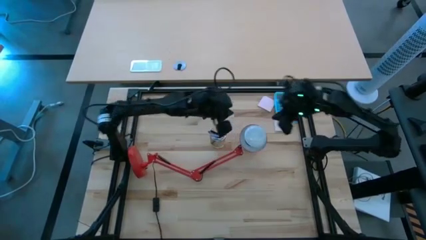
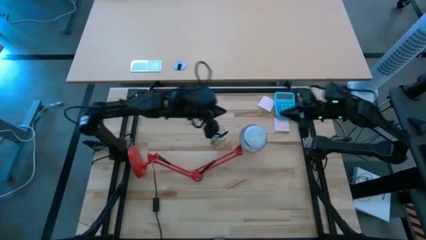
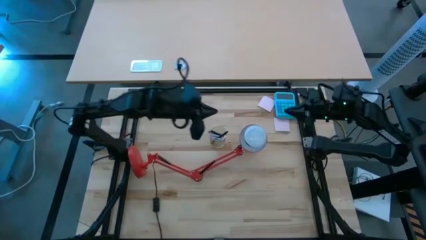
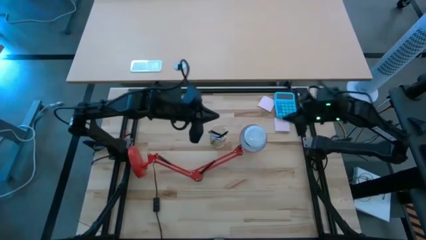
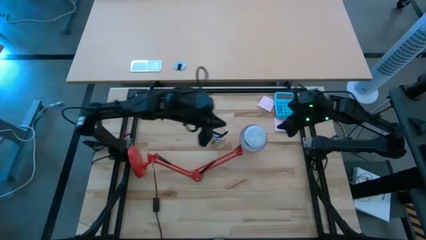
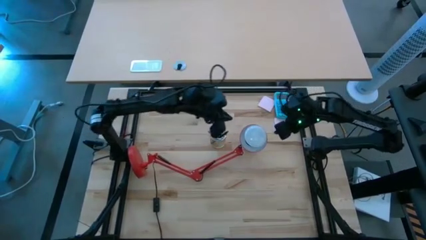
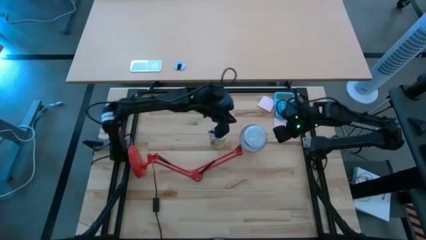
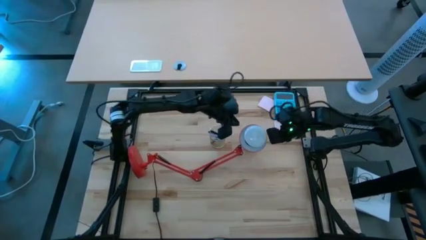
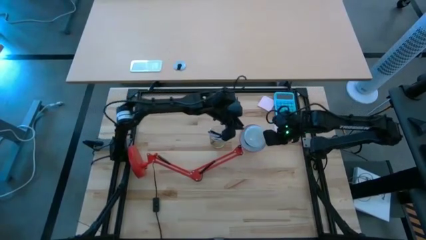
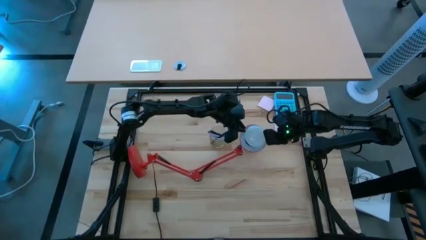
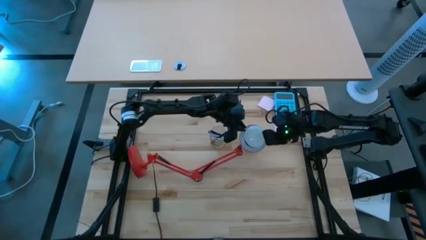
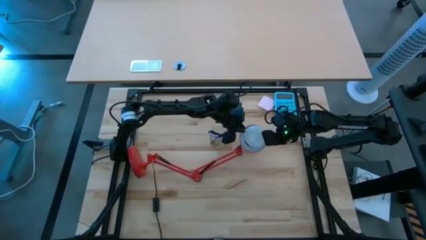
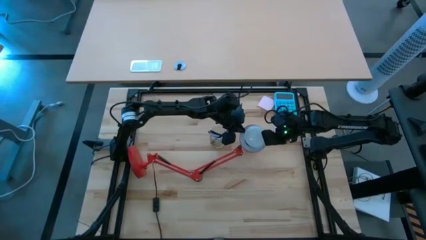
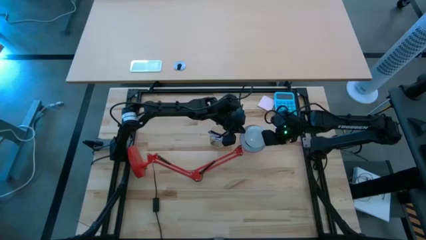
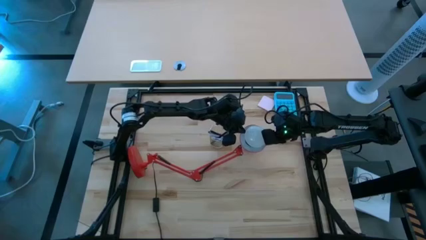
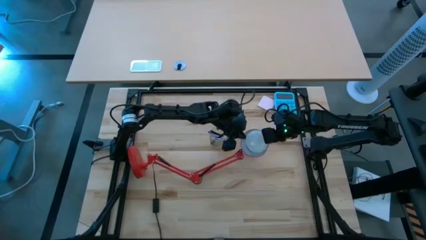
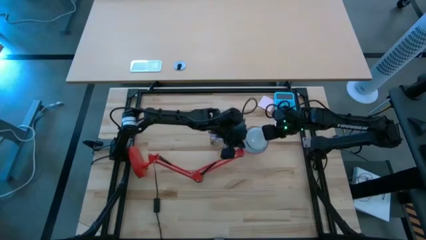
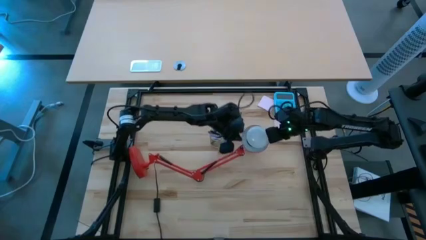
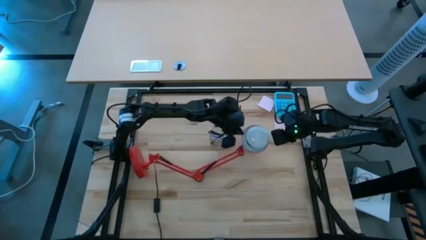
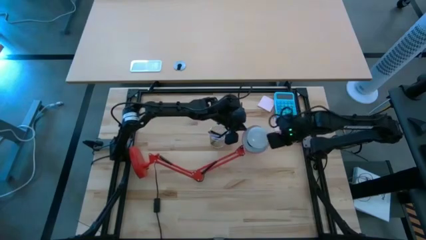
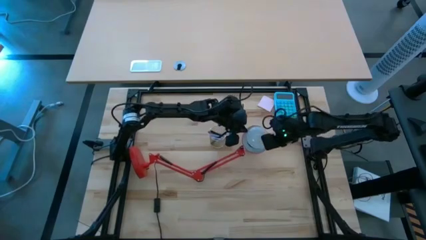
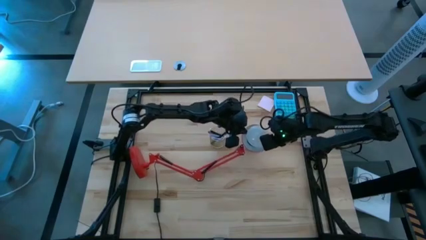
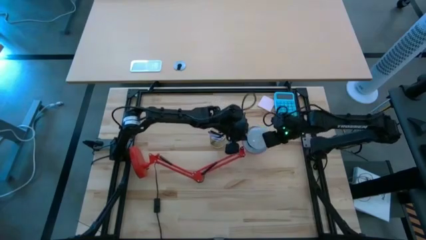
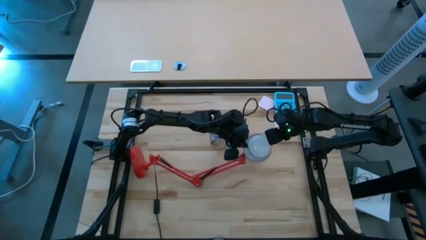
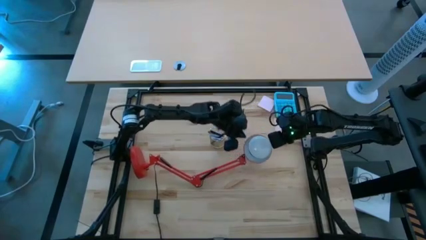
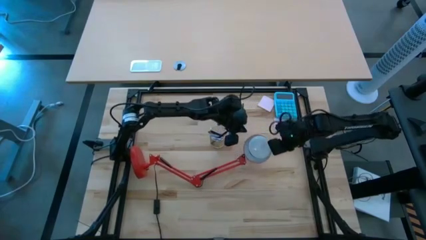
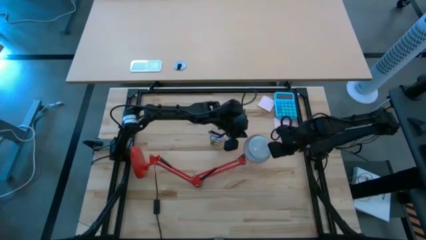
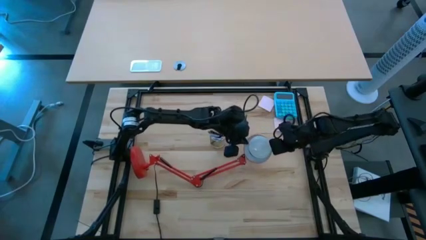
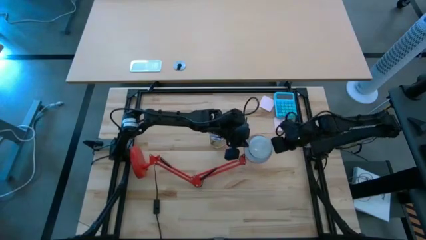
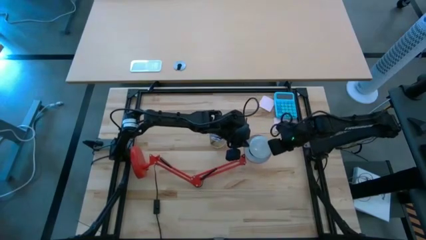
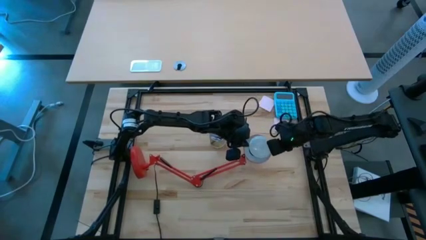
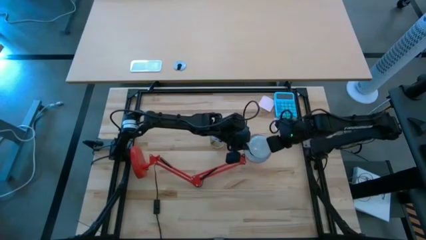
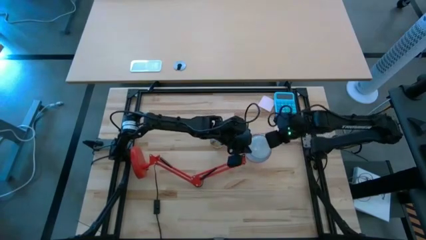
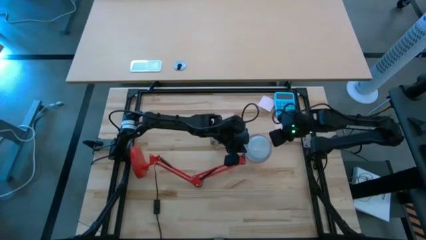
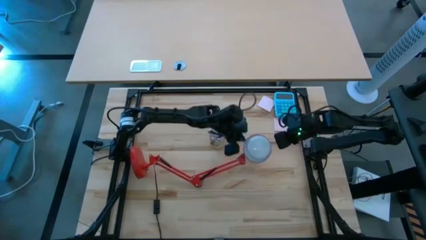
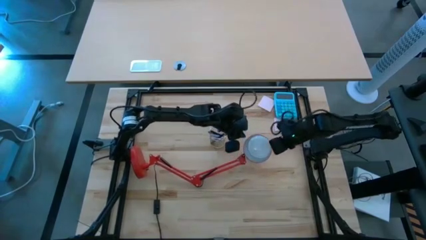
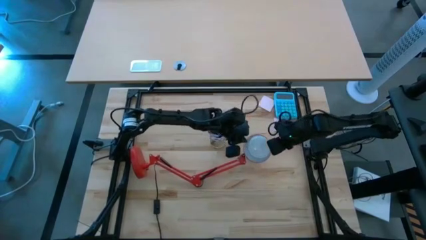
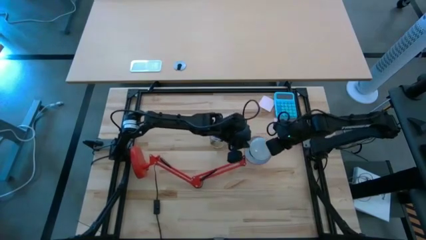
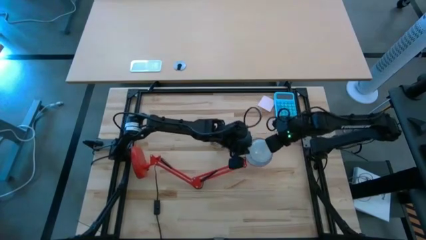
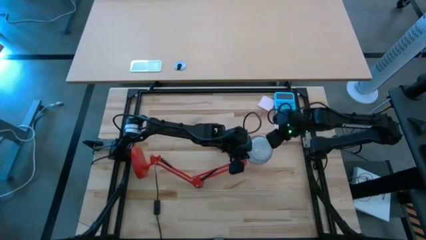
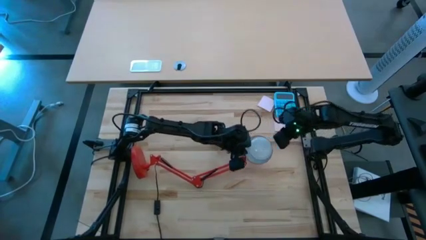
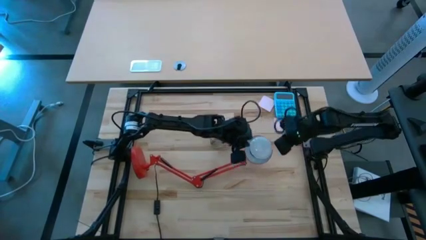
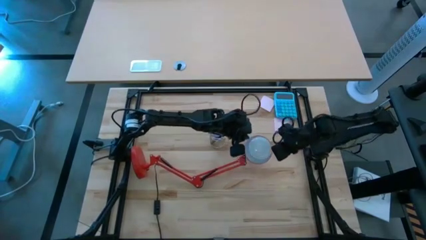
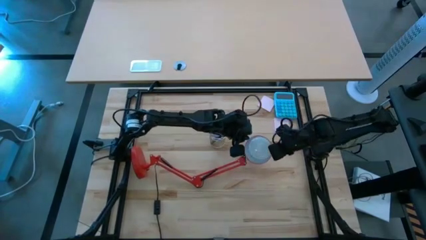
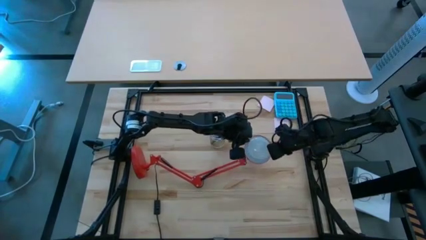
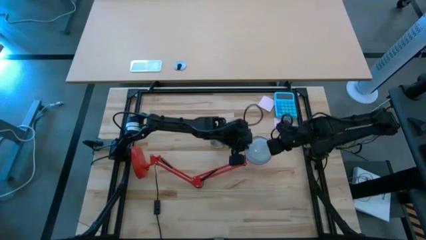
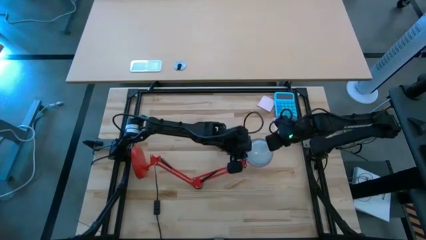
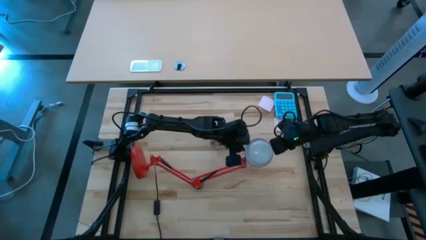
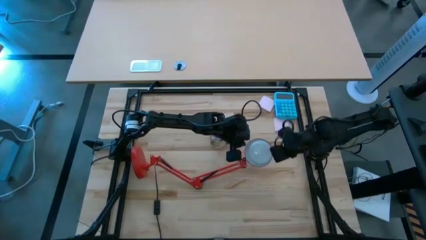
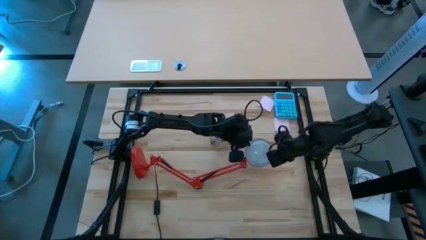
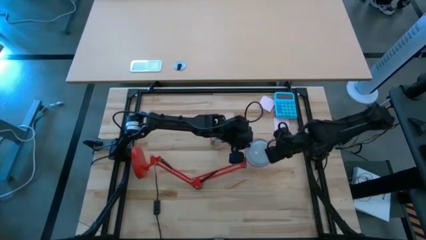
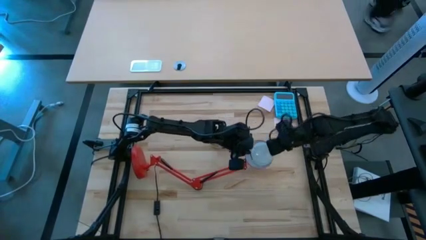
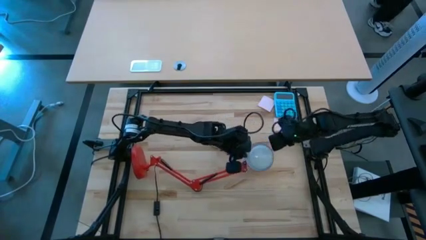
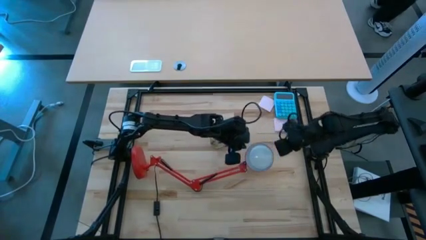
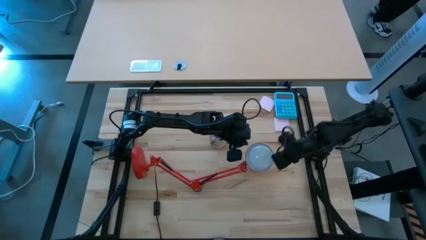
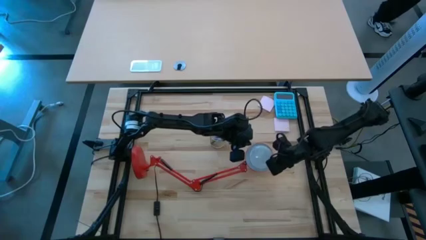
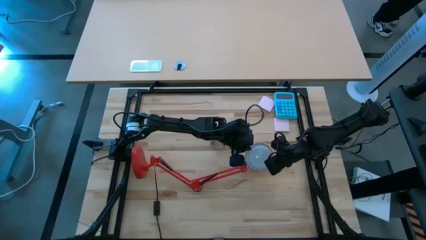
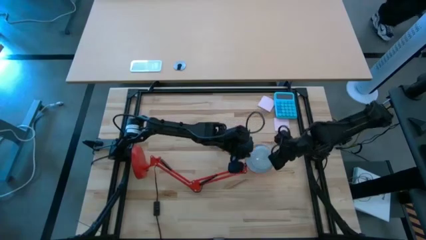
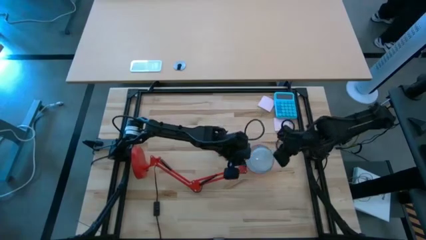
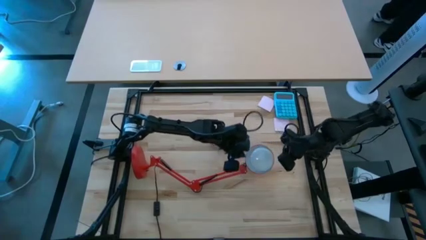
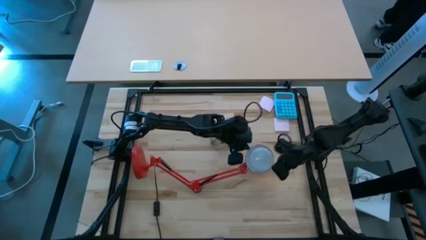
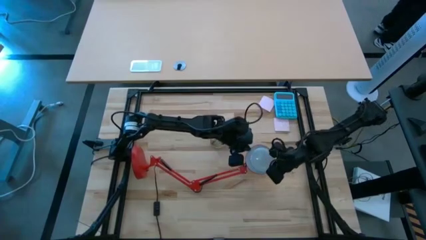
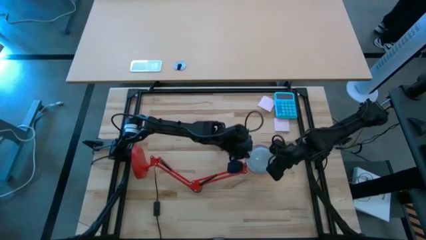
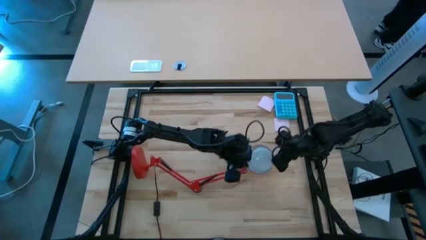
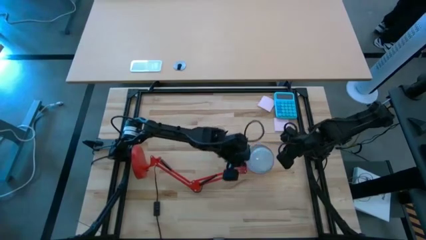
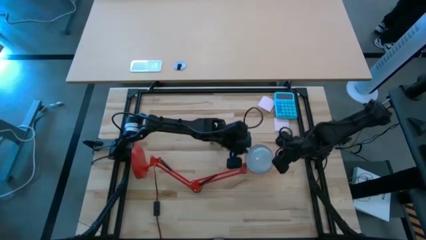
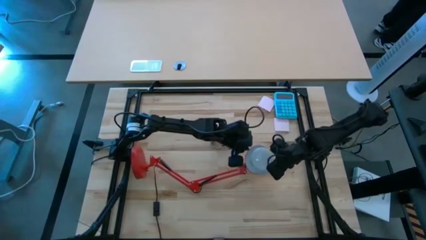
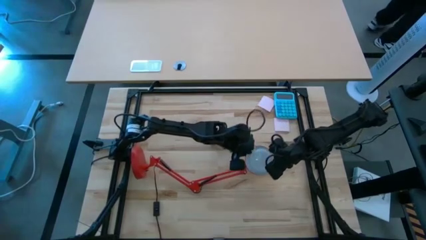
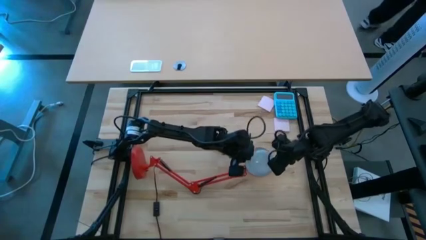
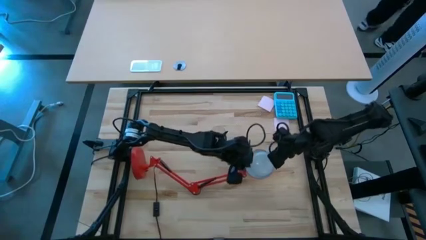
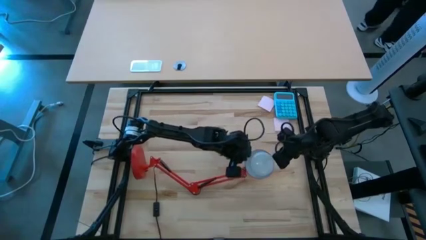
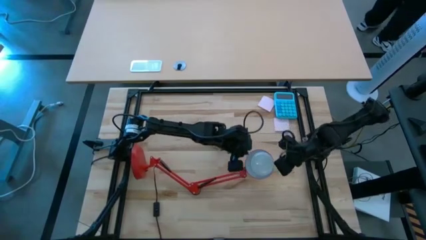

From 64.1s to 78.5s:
Task: Screw lightbulb
Remove the light bulb from the lamp

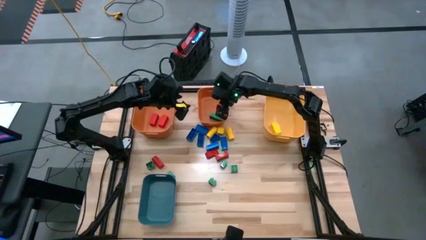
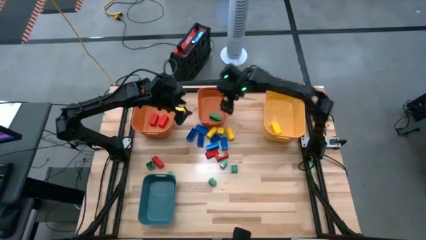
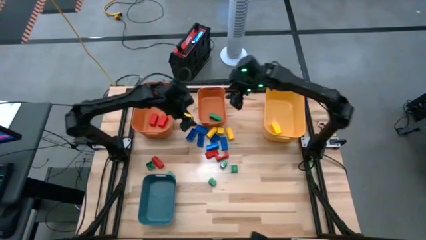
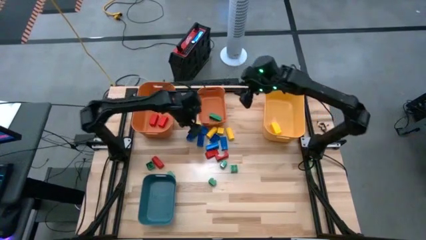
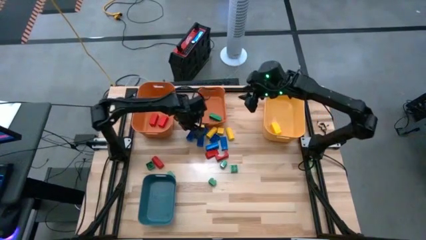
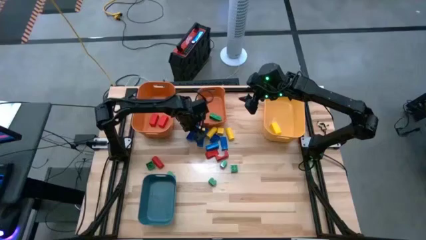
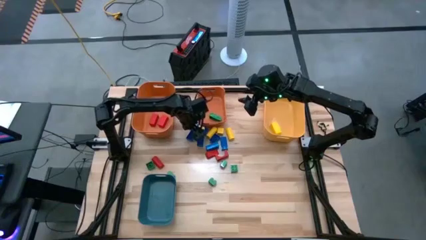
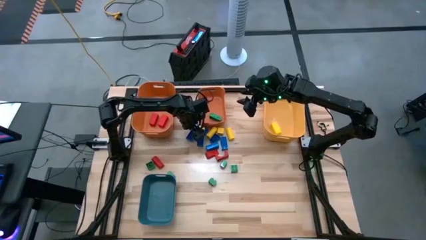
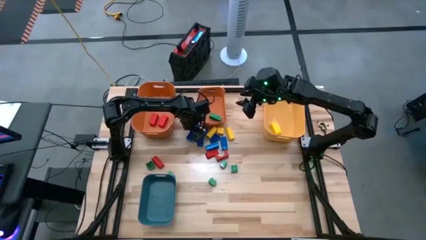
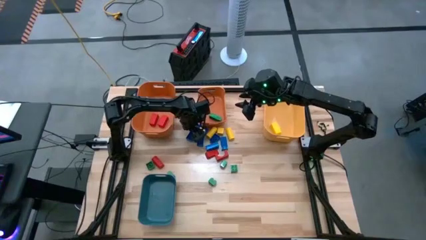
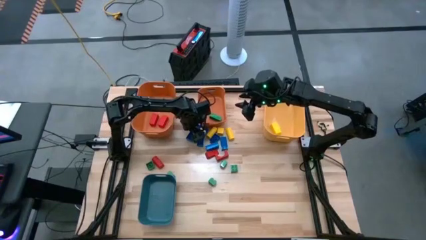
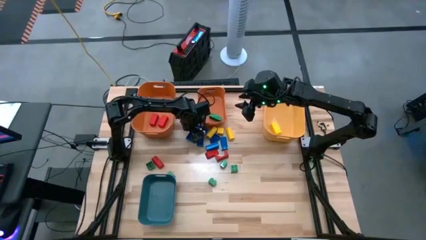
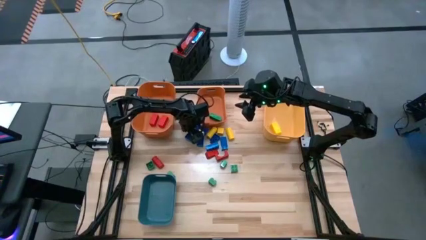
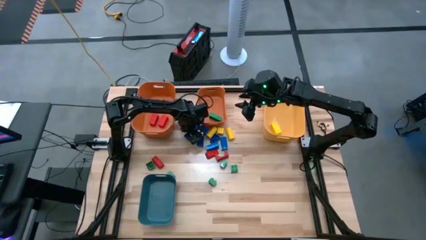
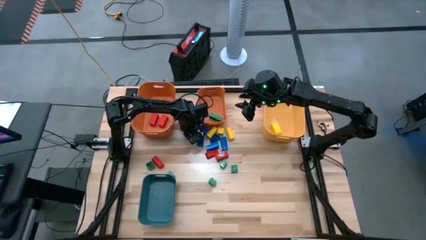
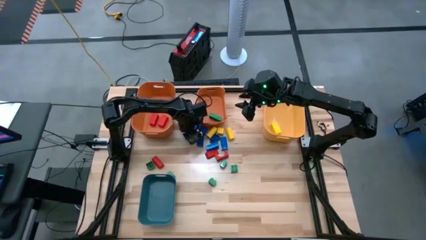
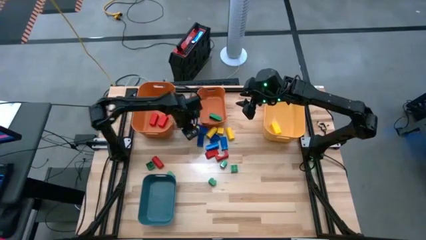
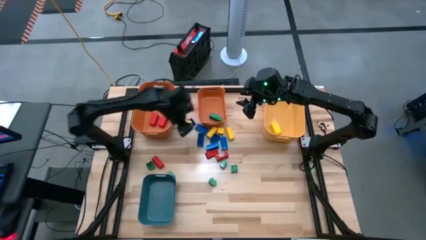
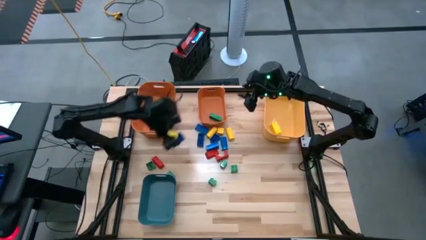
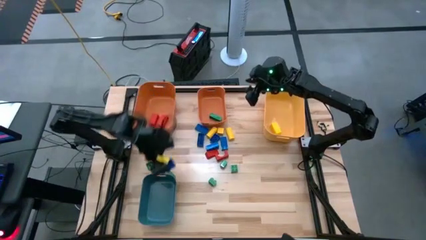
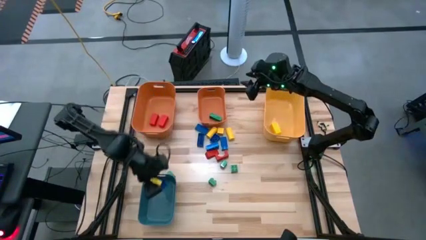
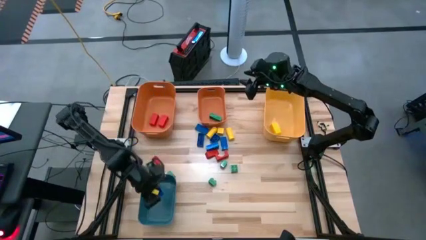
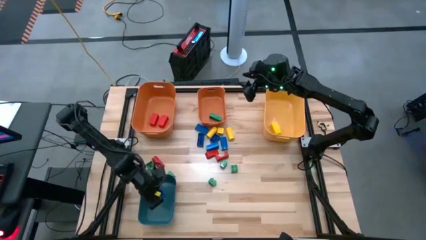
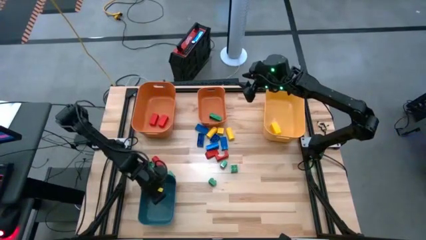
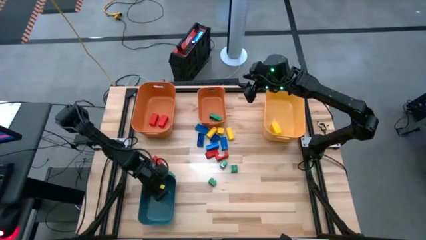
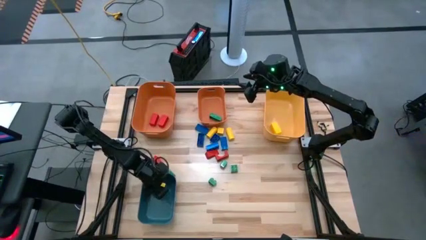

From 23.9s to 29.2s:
Task: Sort blocks
Put the blue game piece into the blue bin
